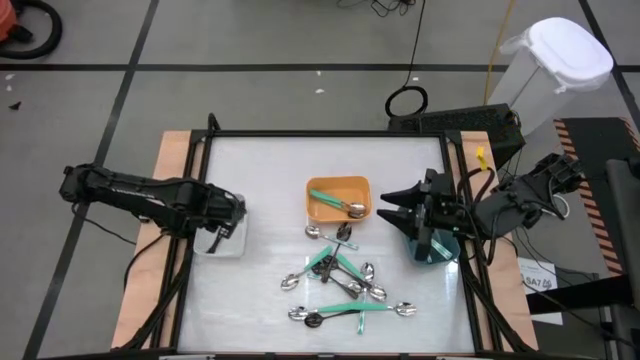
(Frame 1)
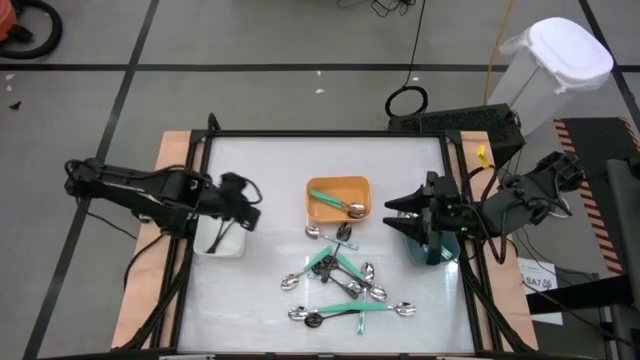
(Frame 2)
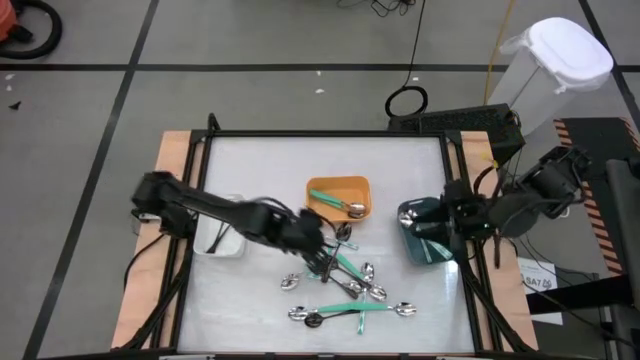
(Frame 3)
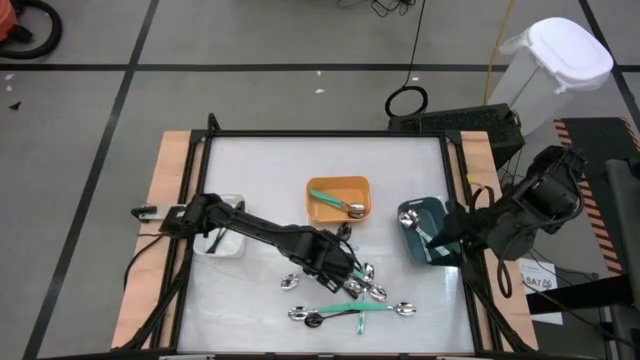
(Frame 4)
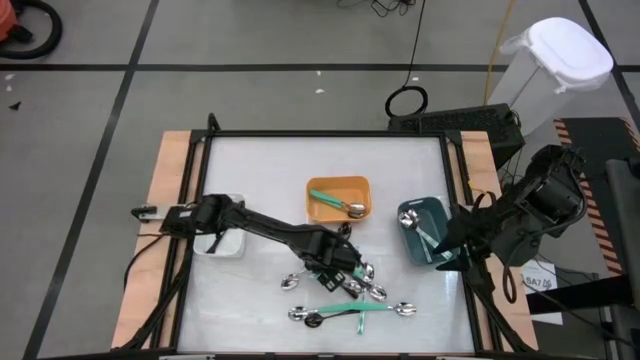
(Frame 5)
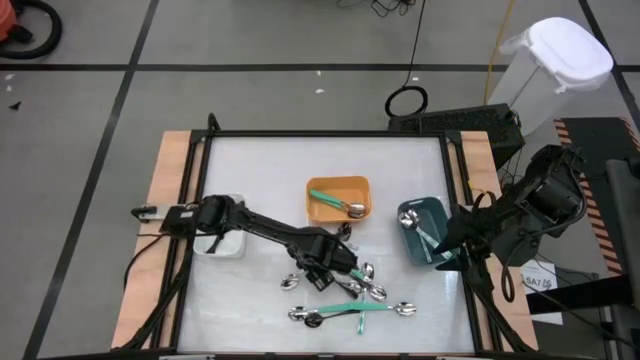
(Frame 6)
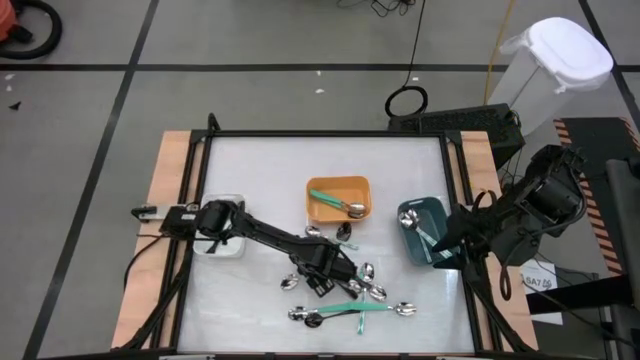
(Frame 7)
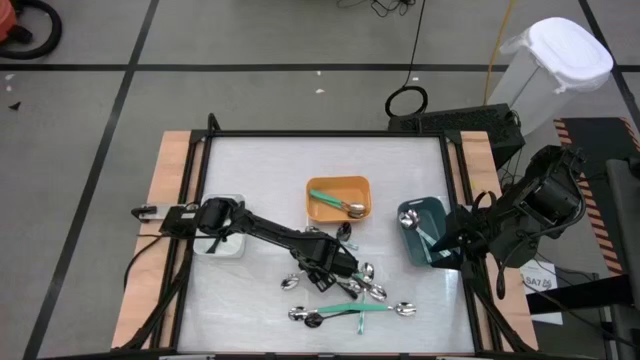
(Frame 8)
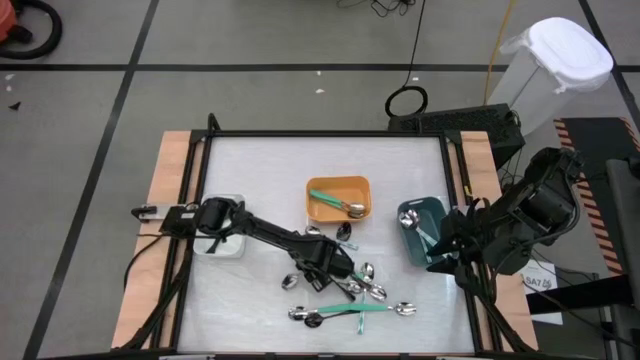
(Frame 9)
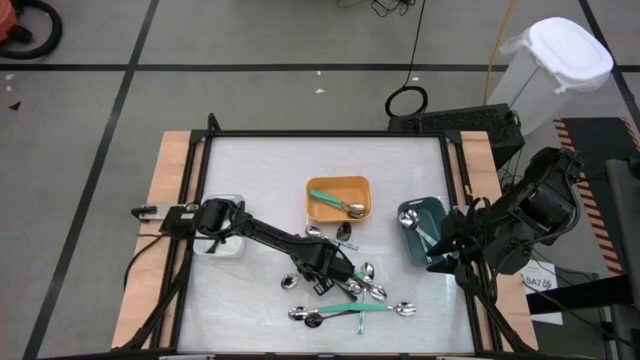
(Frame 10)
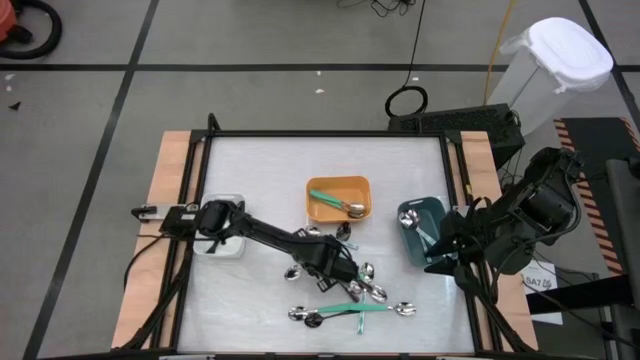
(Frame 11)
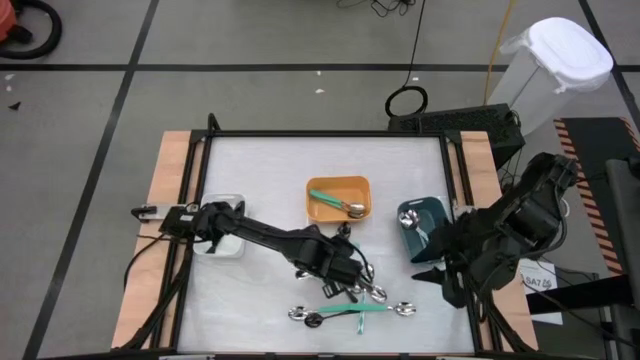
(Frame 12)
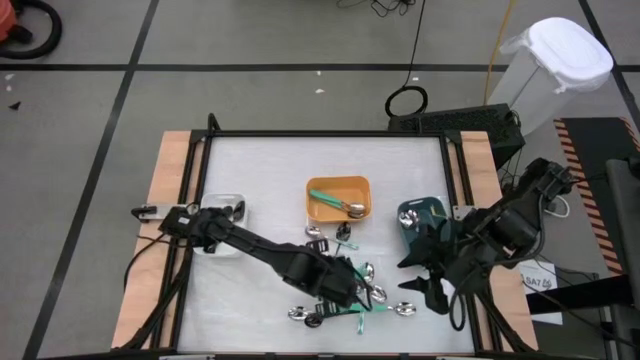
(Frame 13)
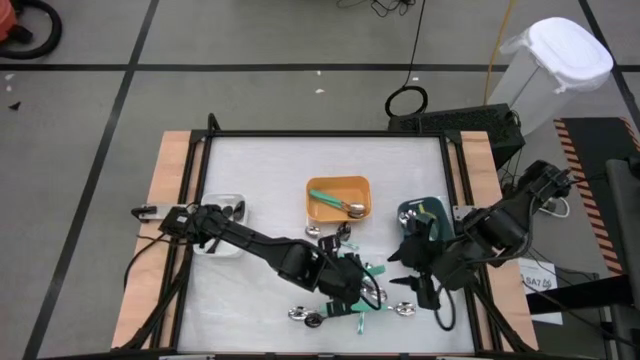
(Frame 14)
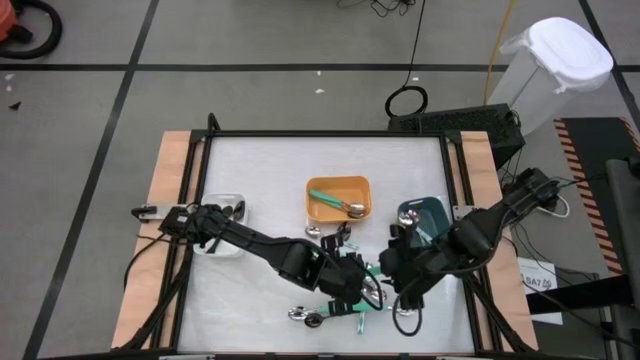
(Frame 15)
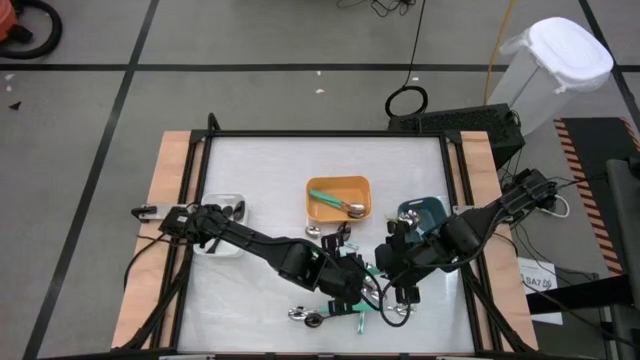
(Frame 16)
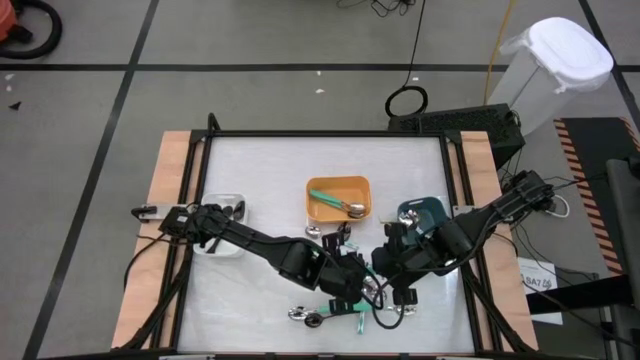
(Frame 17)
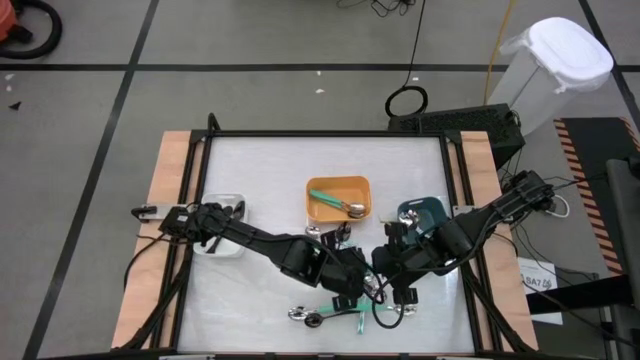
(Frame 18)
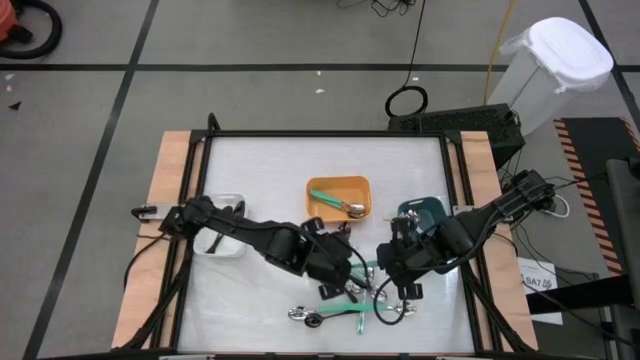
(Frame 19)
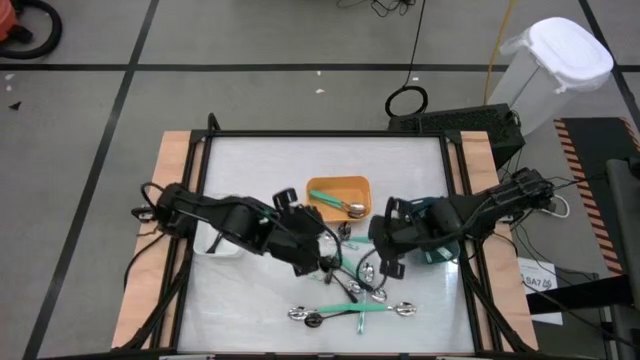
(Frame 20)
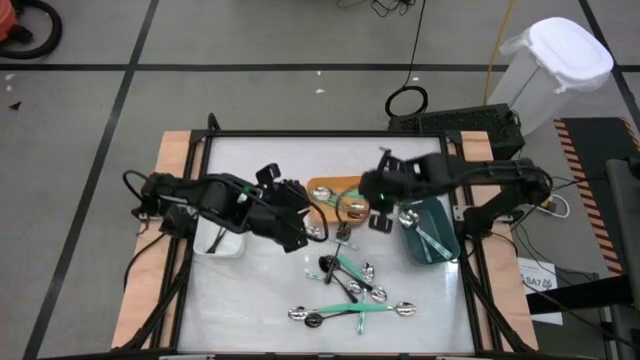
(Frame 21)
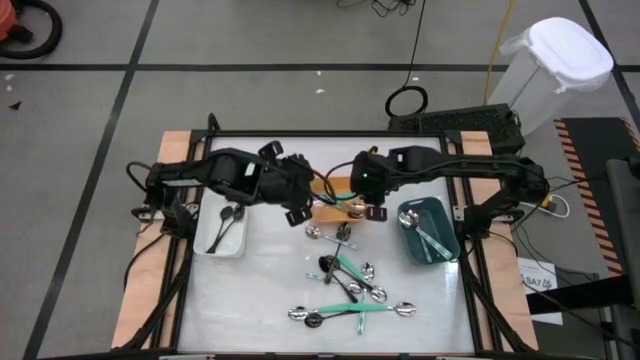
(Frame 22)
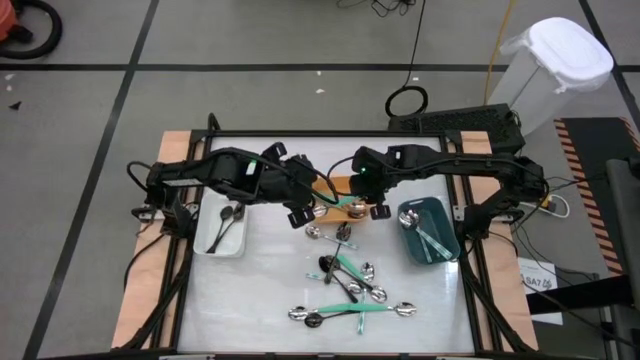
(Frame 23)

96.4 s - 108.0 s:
Task: Sort silverware by color (type)
Put the green spoon into the orange bin

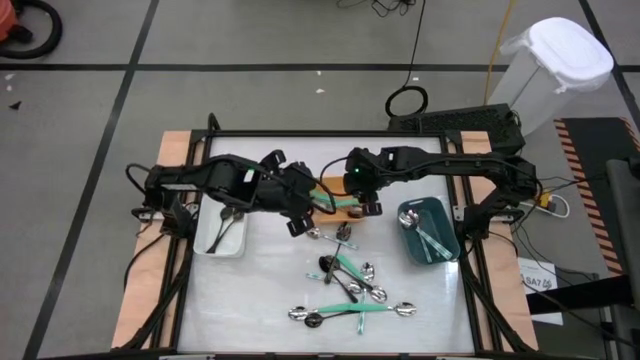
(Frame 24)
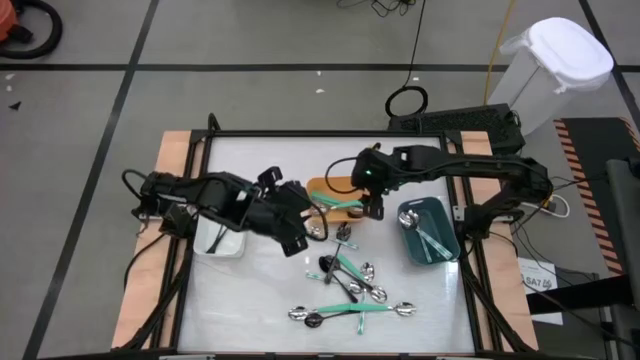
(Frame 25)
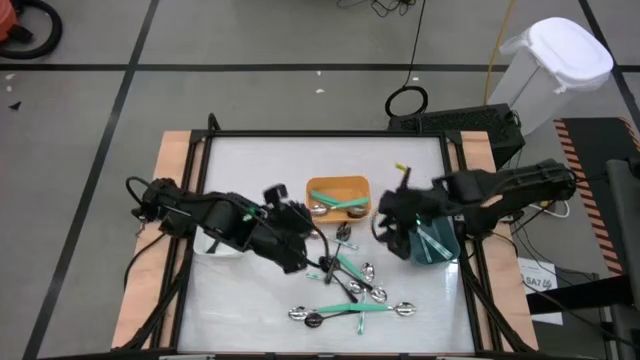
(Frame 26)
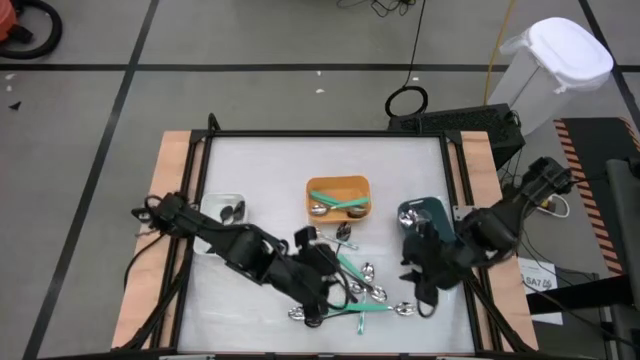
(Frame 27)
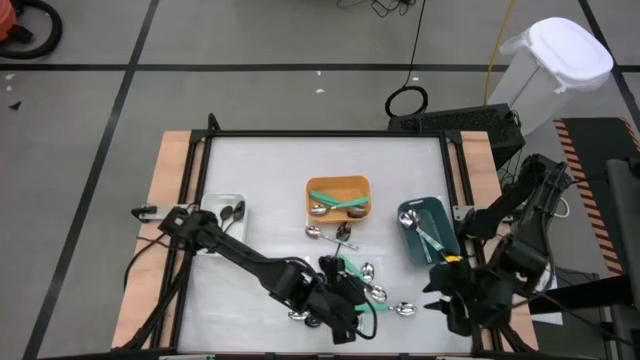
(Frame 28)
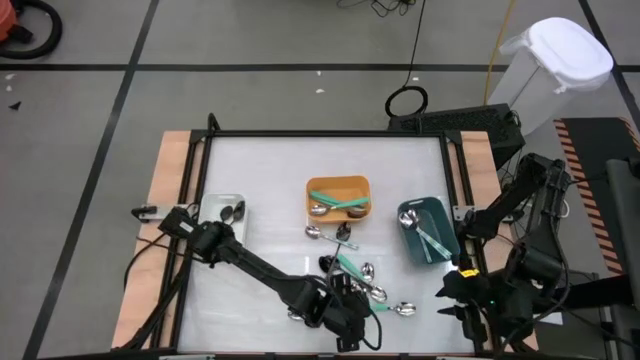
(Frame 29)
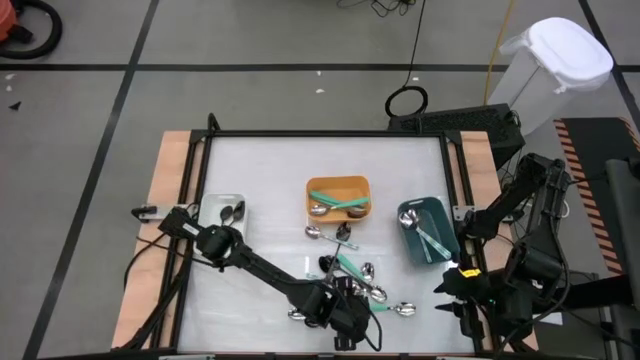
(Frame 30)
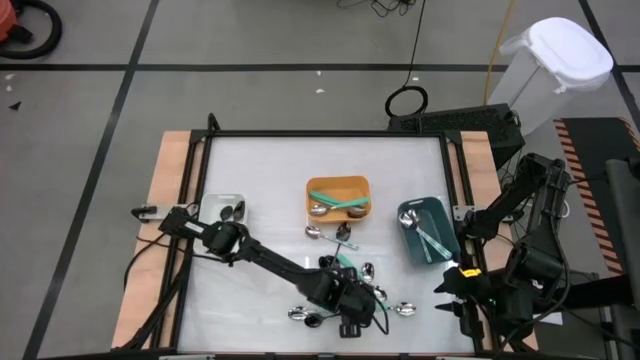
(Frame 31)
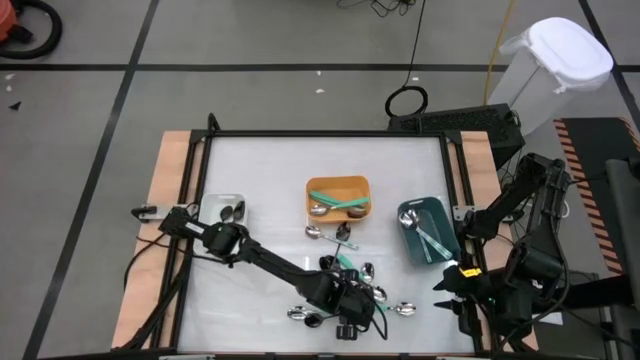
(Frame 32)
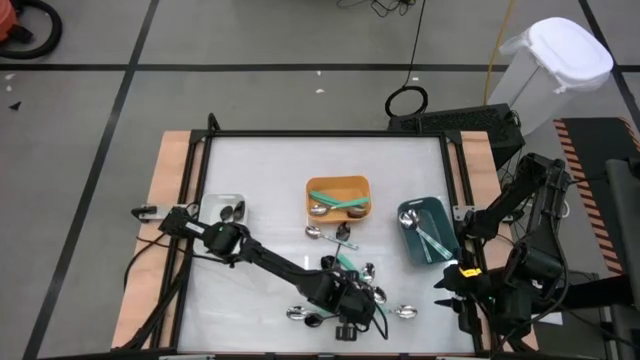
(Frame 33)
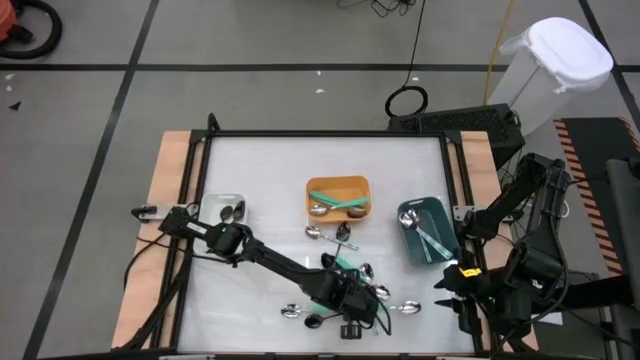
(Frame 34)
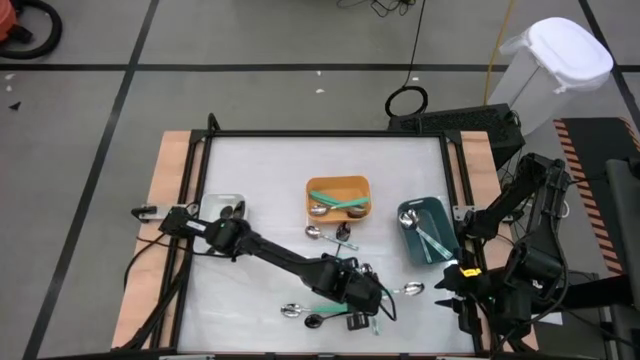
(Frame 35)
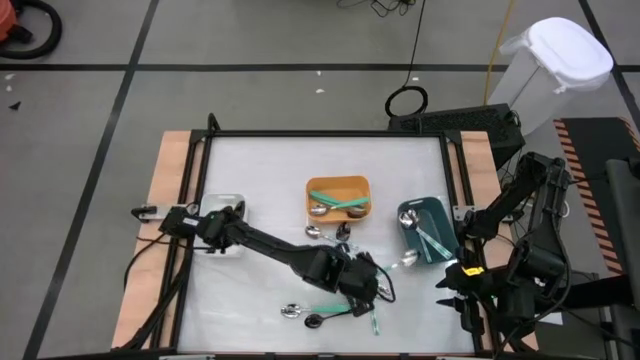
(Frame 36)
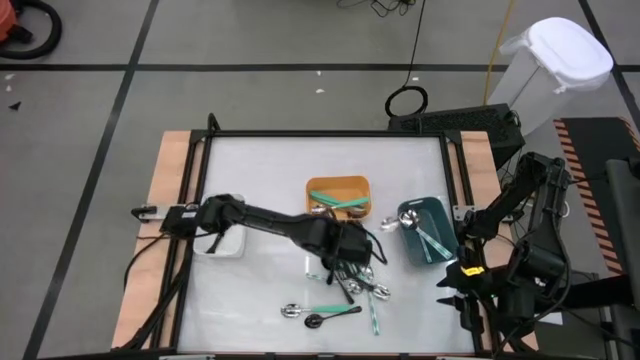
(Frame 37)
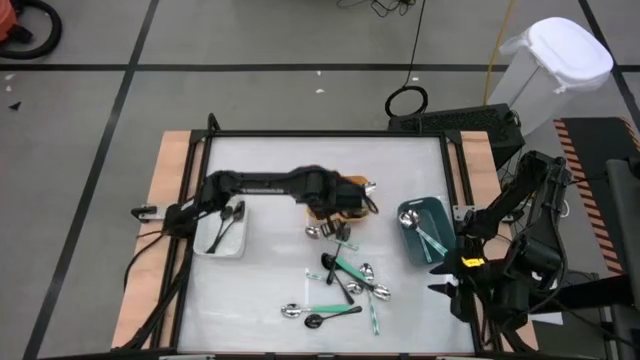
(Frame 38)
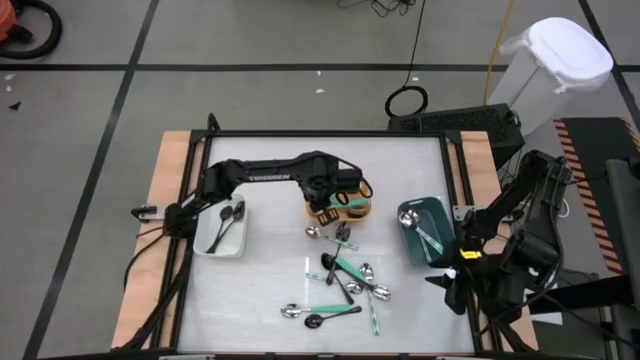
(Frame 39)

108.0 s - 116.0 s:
Put the green spoon into the orange bin
